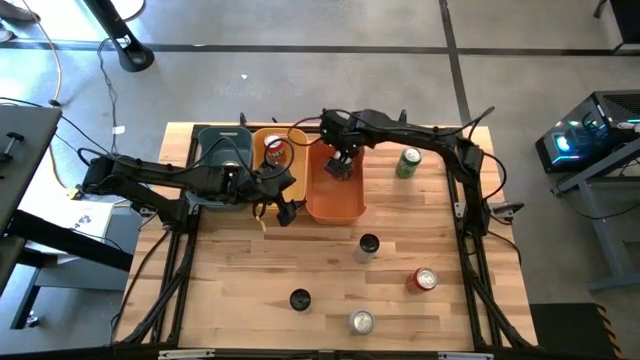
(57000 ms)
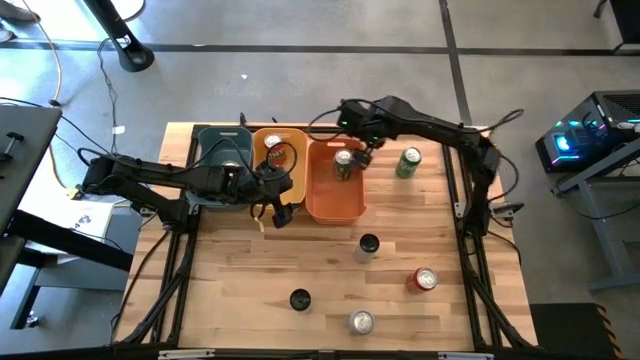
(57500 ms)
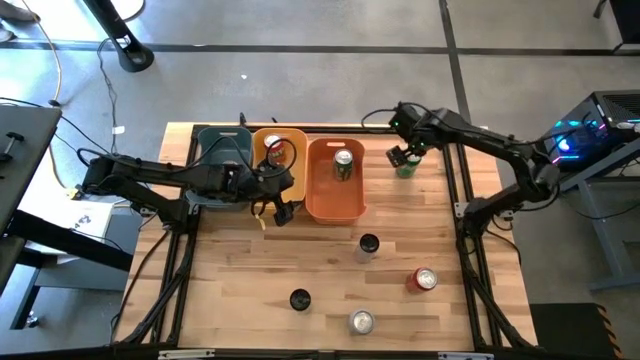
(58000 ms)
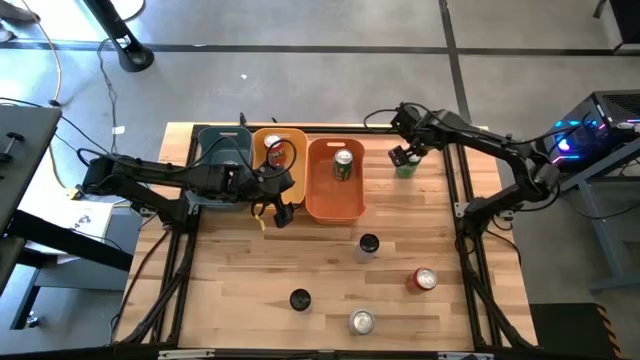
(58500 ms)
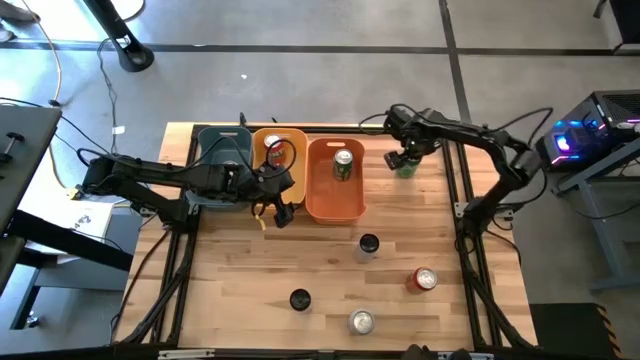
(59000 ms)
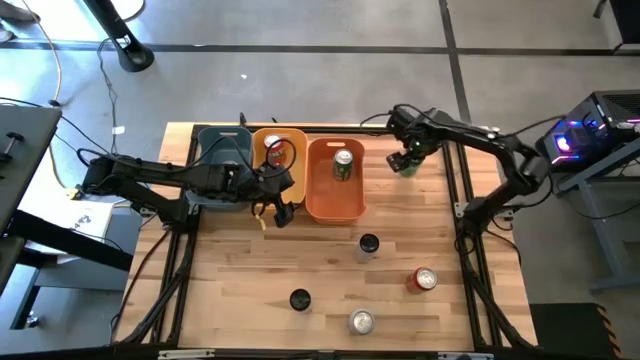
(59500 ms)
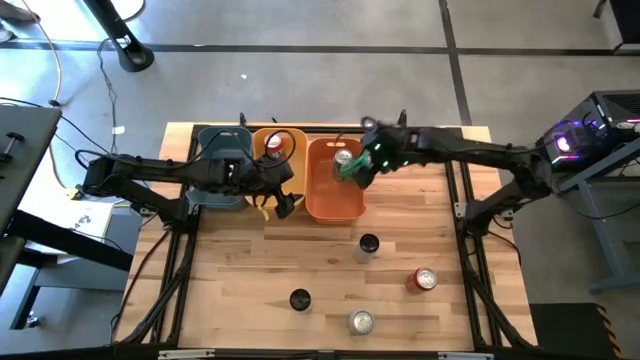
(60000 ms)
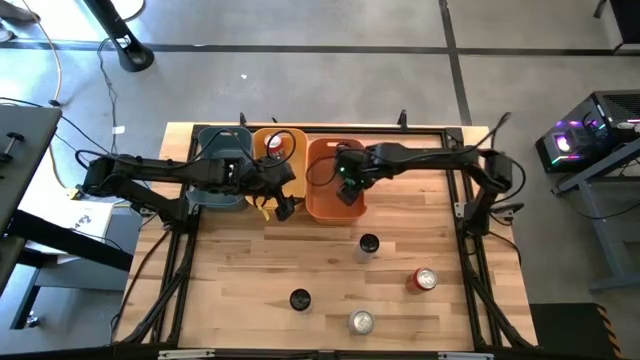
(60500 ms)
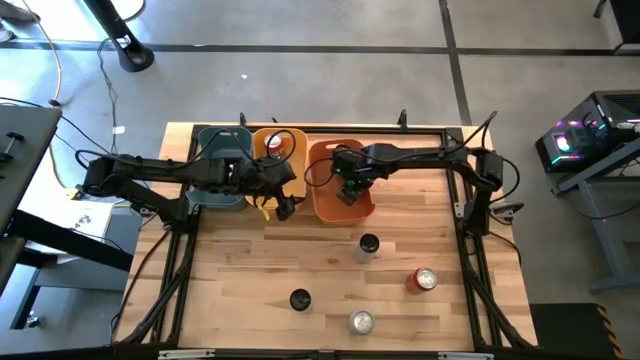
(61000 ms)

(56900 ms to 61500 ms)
Task: Sort soda cans
Put the green soda can into the orange bin

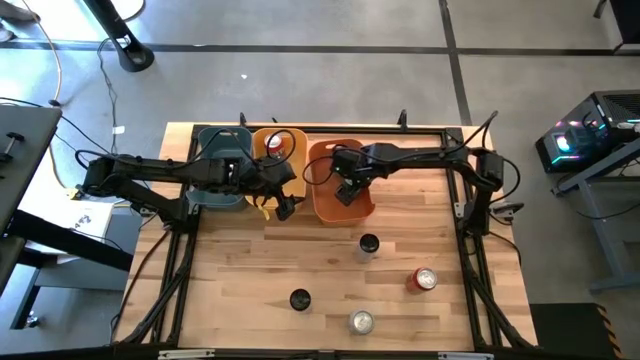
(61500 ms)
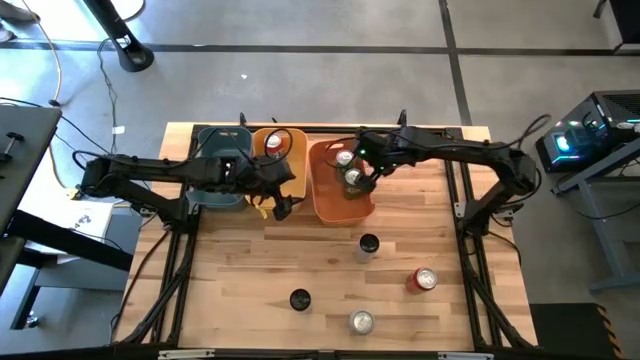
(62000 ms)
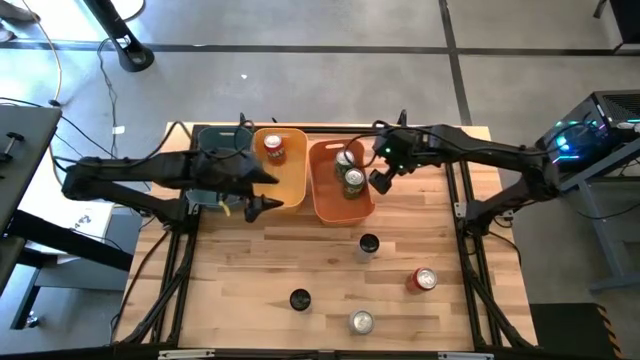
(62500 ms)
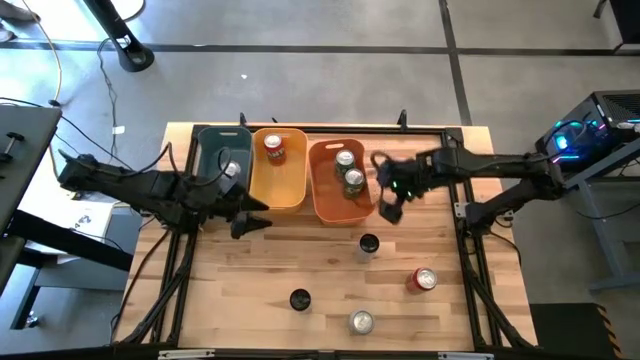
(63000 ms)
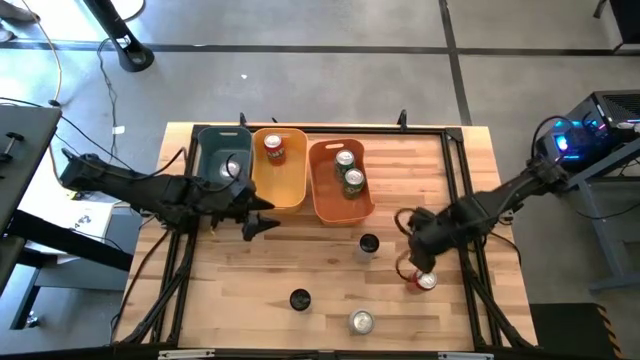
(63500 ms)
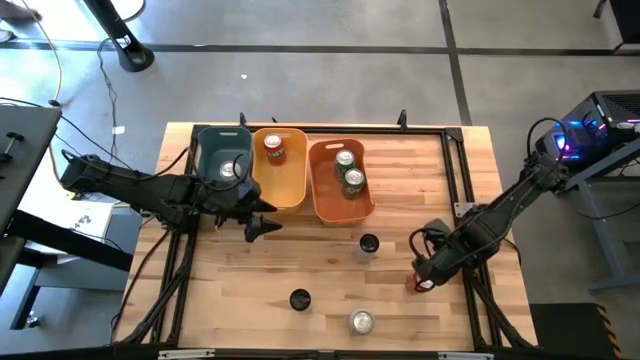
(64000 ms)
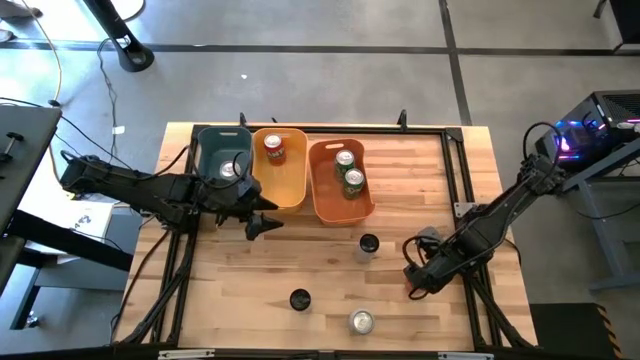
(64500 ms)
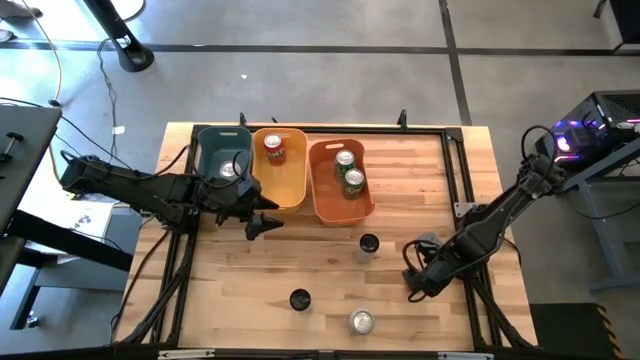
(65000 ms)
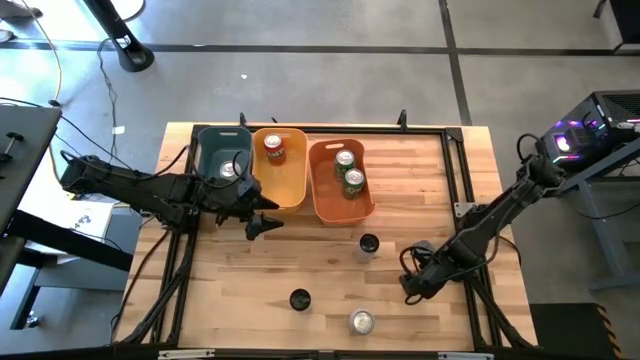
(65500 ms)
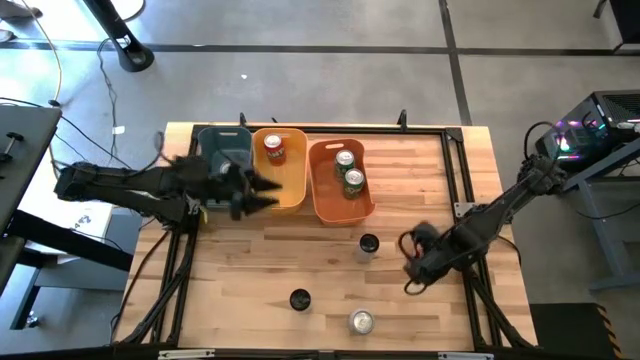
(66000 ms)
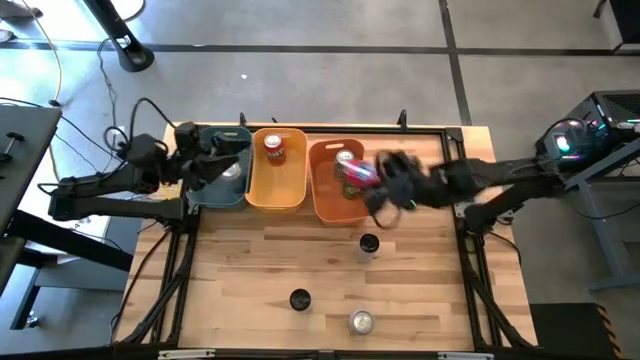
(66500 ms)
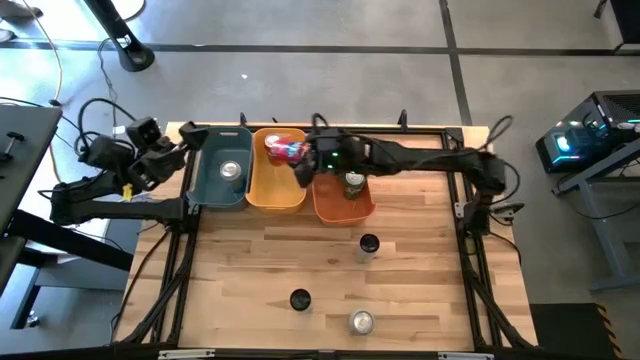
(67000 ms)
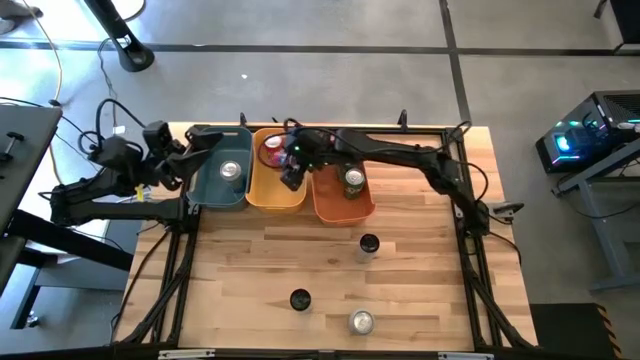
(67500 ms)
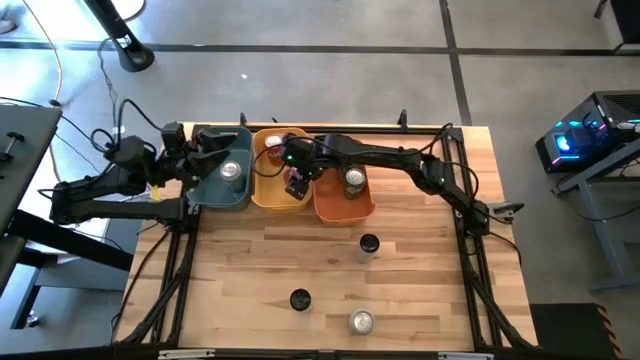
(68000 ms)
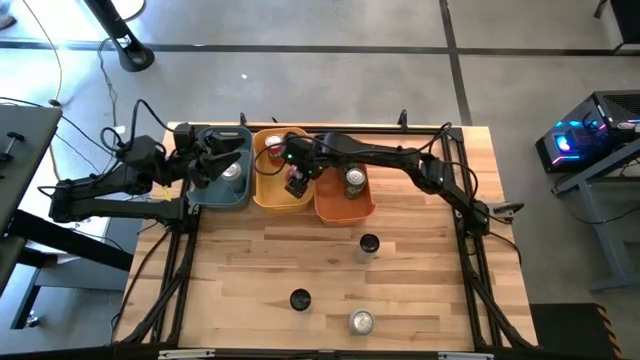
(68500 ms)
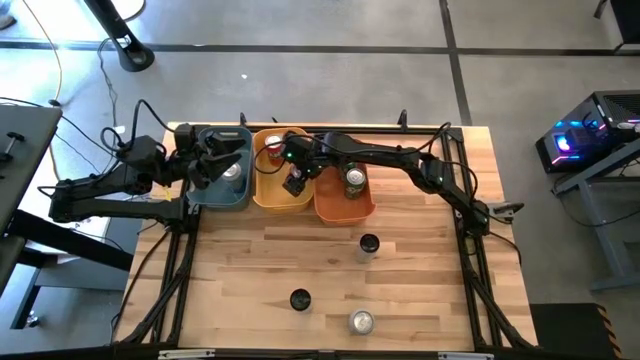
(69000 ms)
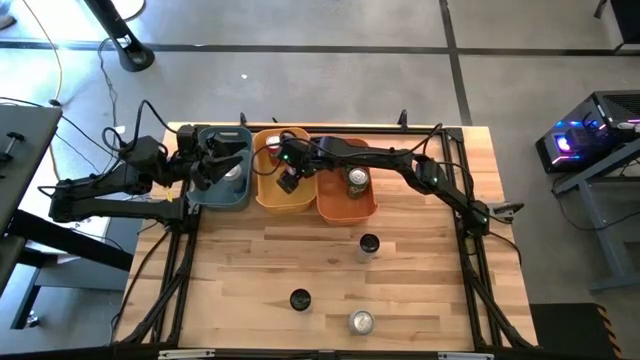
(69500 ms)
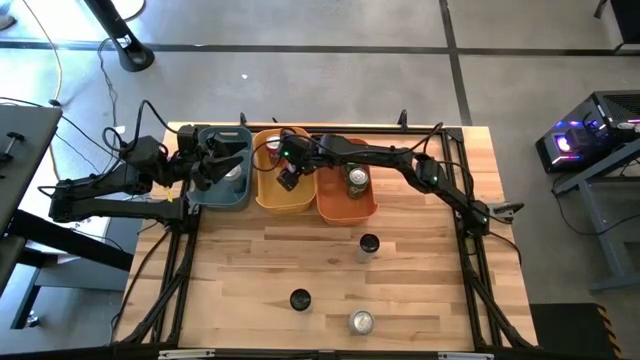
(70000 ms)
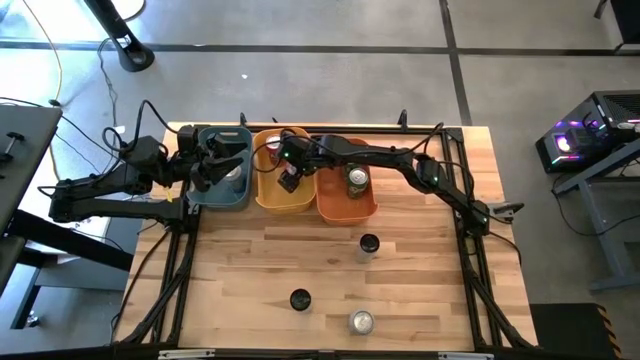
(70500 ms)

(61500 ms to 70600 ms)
Put the orange soda can into the yellow bin

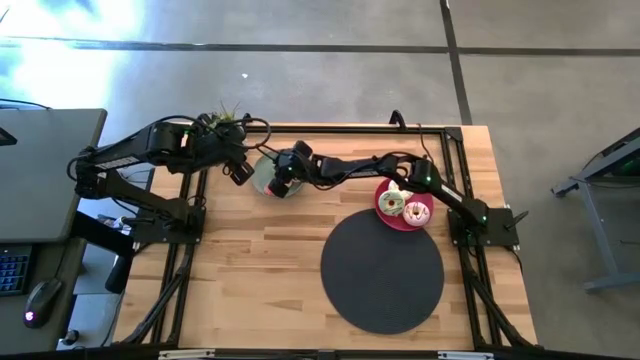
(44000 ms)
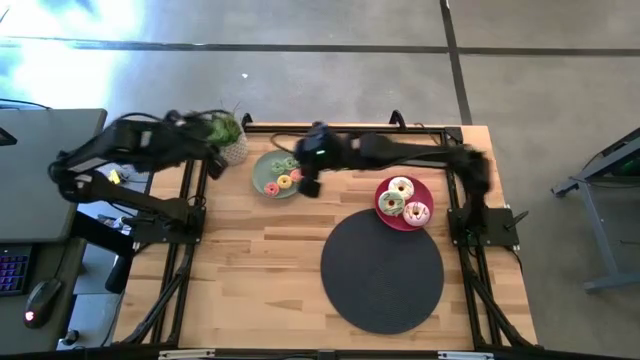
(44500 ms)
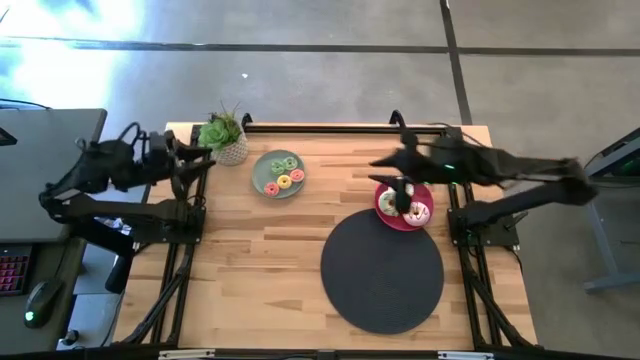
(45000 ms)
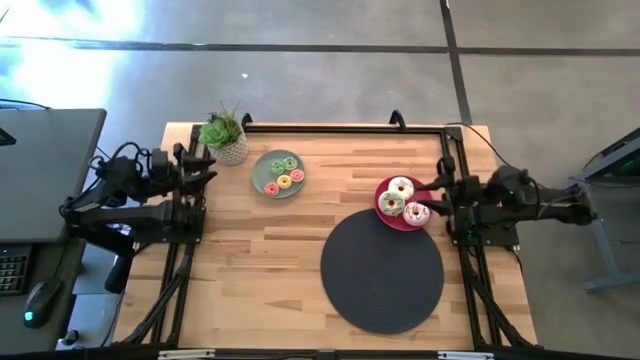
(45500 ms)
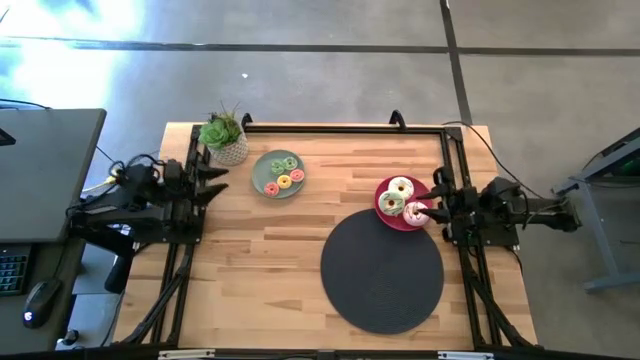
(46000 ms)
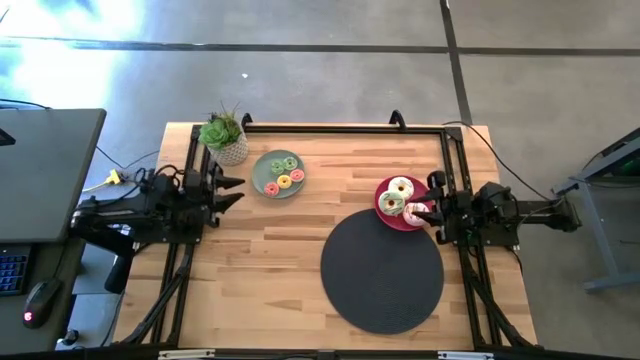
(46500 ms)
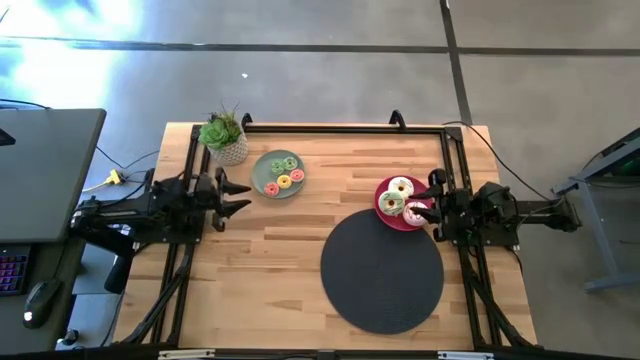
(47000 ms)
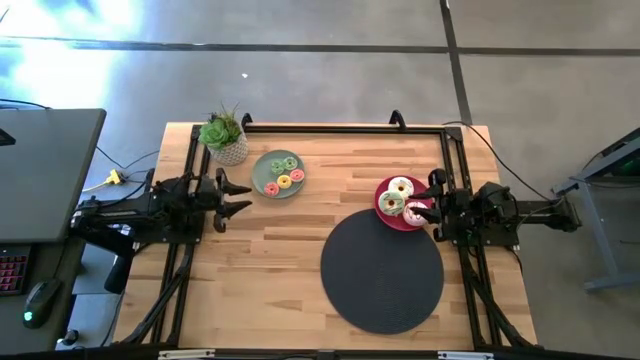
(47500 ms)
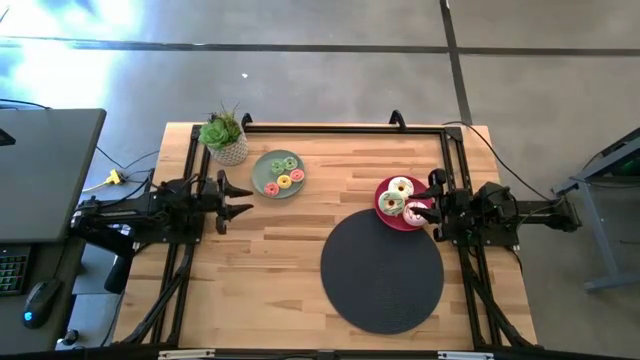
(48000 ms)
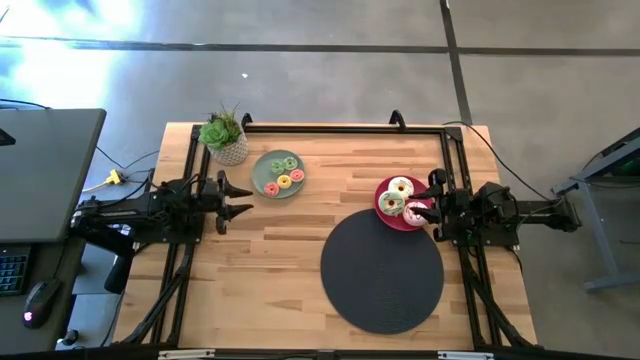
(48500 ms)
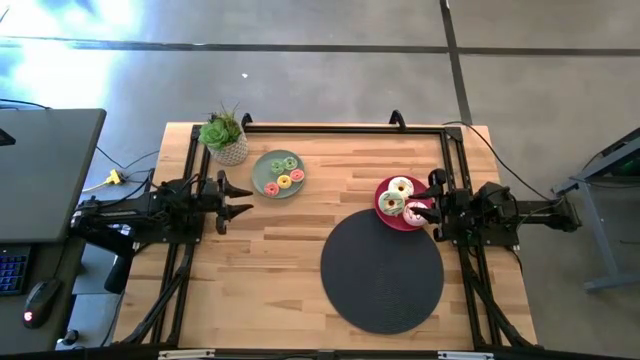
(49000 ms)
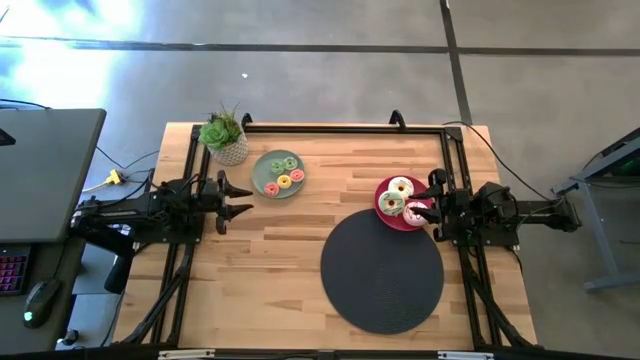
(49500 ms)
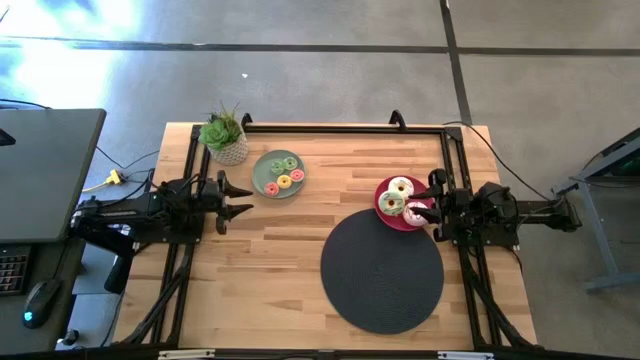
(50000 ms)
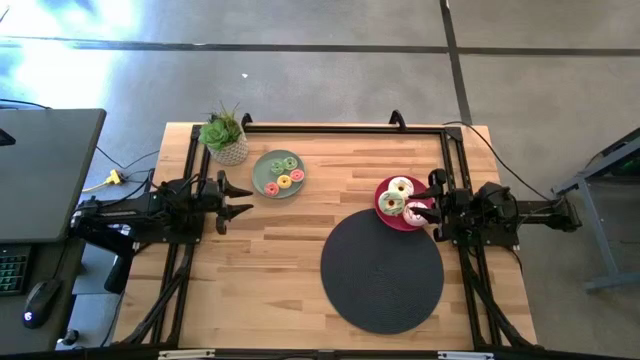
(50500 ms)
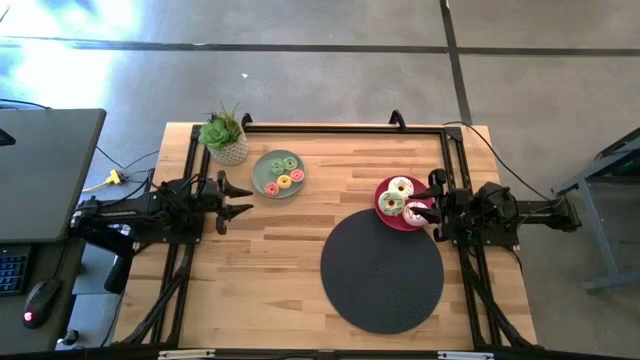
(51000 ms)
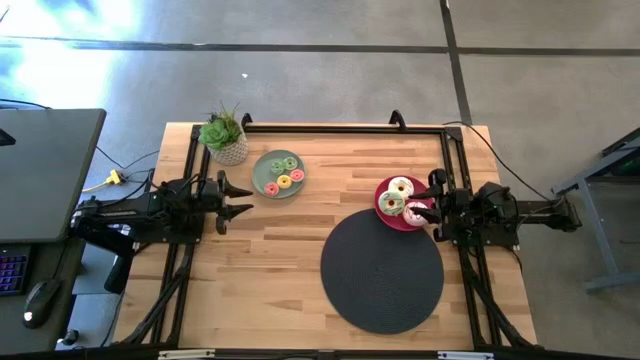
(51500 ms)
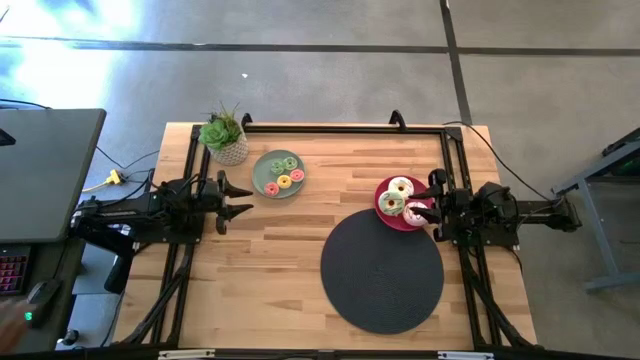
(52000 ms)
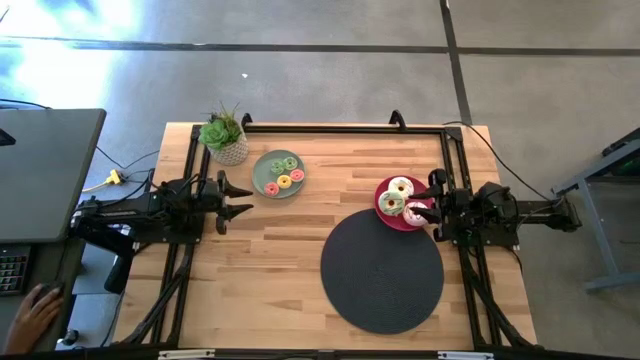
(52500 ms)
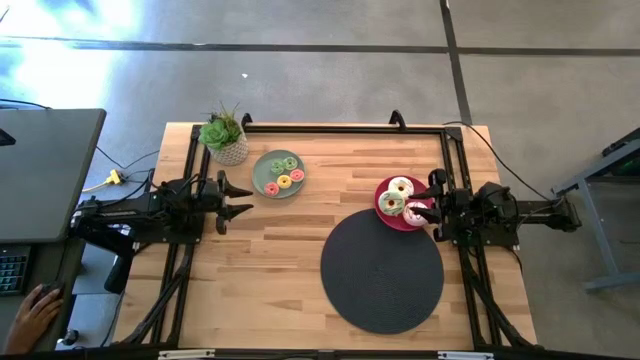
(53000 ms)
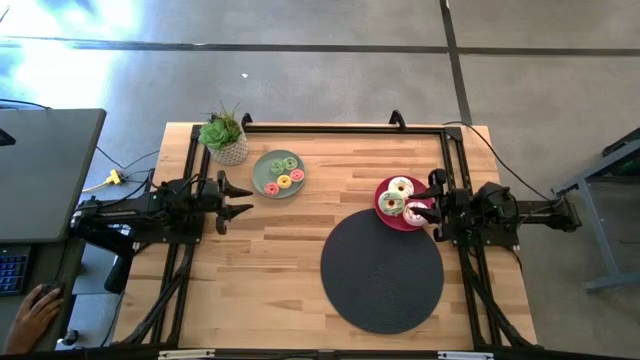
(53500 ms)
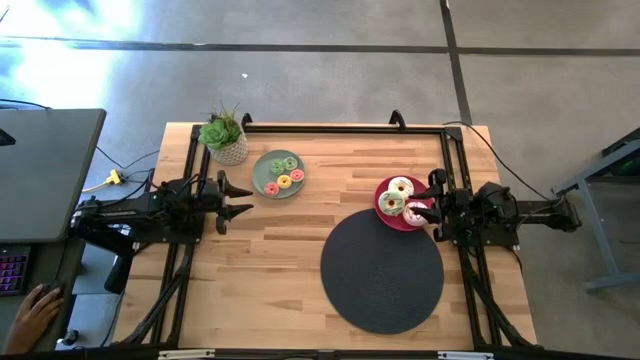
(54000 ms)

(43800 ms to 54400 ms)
Task: Pick & Place donuts
Return to Home Position
